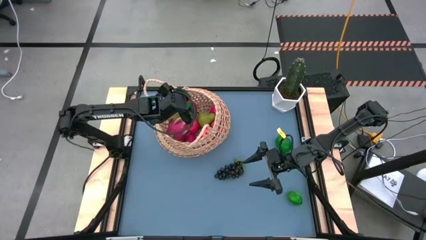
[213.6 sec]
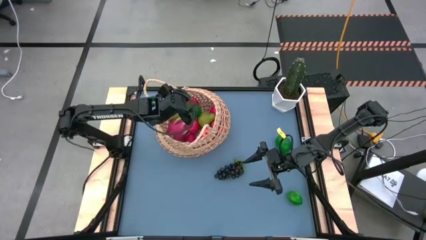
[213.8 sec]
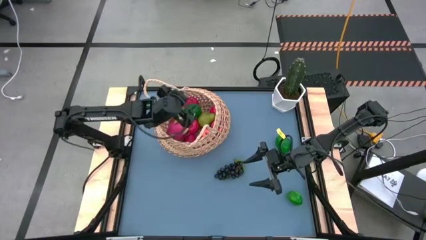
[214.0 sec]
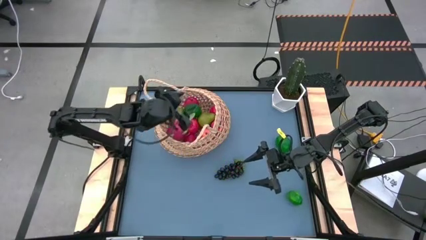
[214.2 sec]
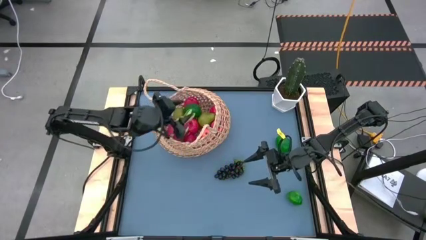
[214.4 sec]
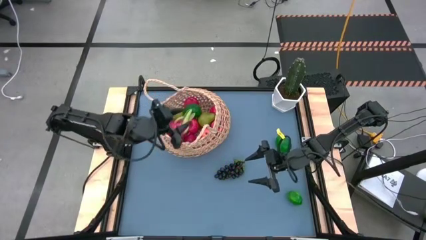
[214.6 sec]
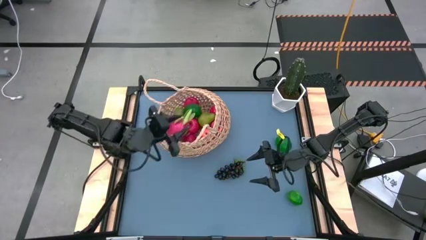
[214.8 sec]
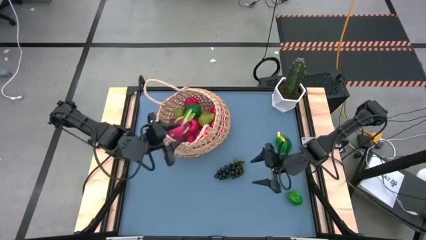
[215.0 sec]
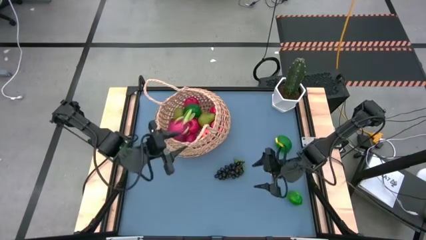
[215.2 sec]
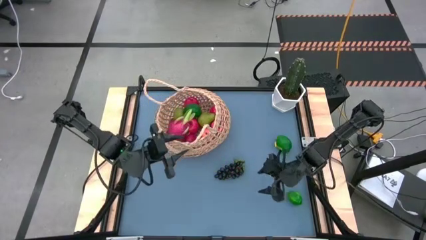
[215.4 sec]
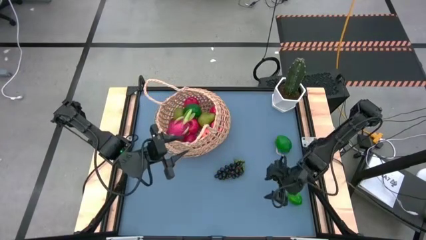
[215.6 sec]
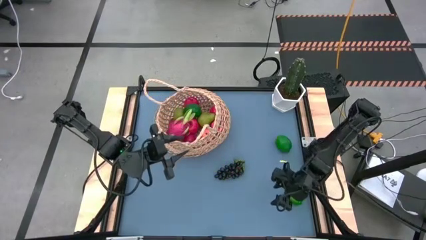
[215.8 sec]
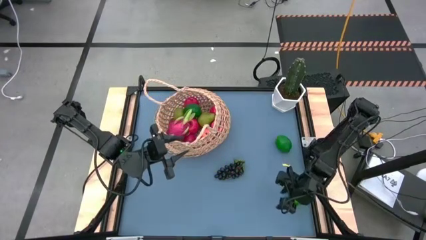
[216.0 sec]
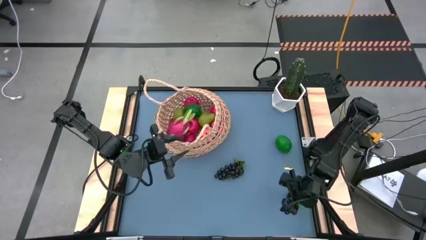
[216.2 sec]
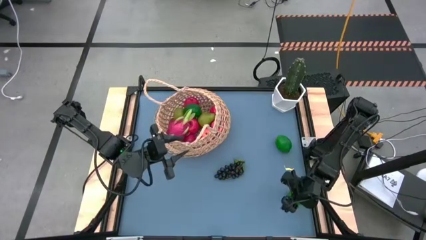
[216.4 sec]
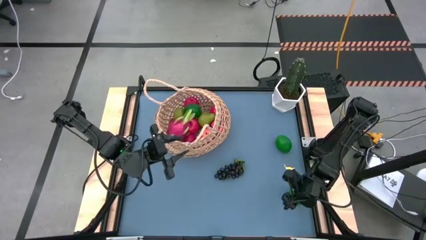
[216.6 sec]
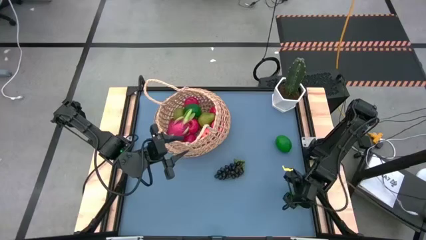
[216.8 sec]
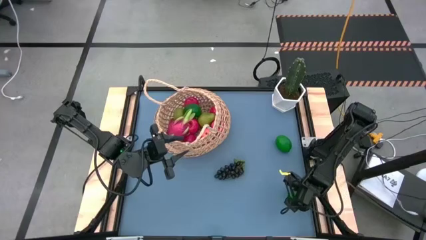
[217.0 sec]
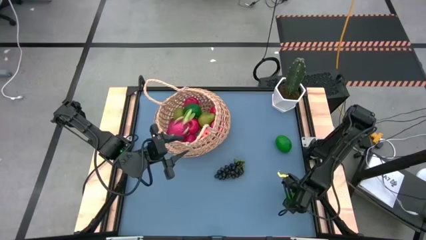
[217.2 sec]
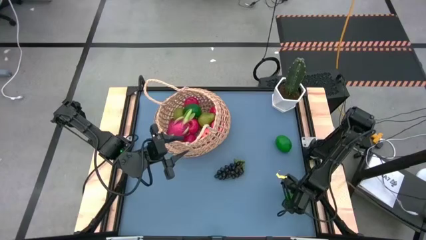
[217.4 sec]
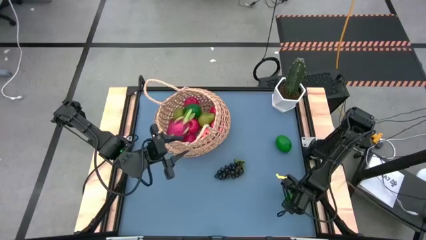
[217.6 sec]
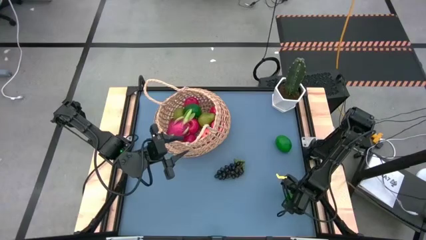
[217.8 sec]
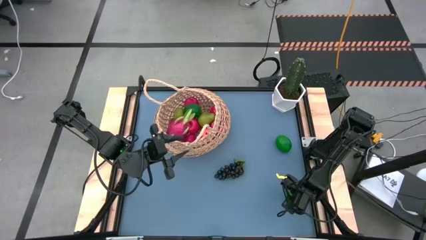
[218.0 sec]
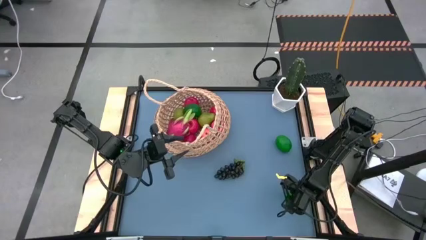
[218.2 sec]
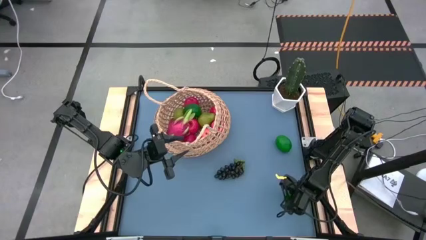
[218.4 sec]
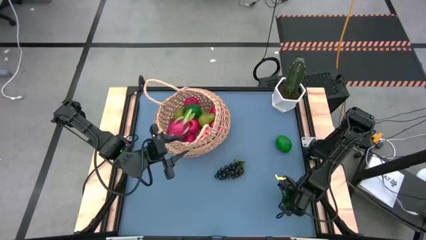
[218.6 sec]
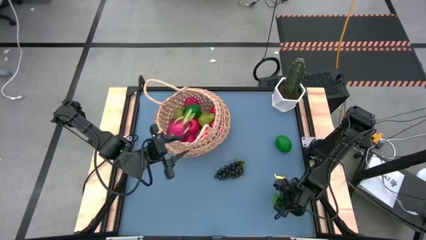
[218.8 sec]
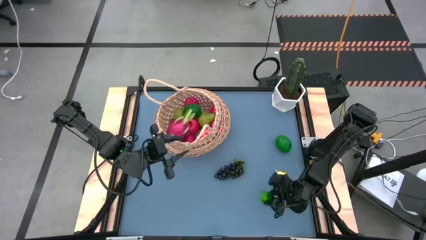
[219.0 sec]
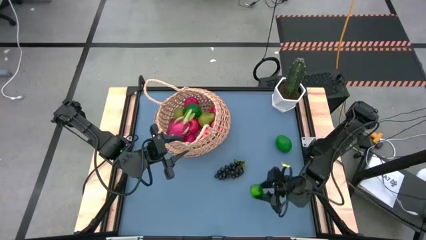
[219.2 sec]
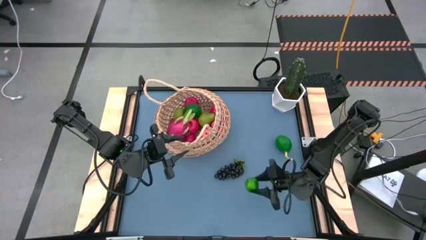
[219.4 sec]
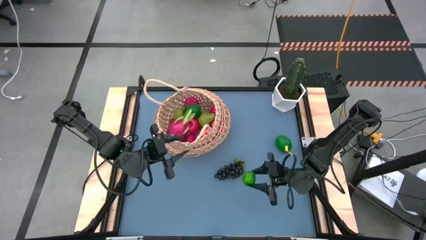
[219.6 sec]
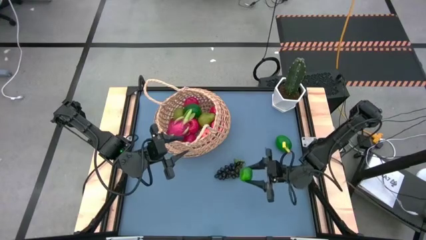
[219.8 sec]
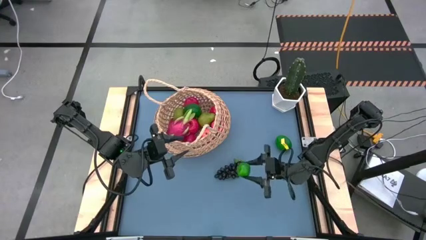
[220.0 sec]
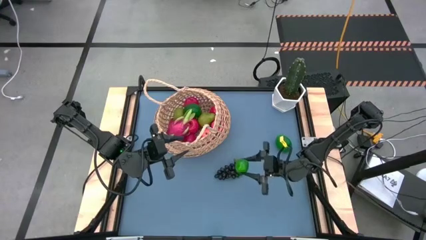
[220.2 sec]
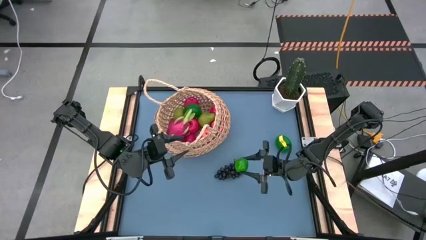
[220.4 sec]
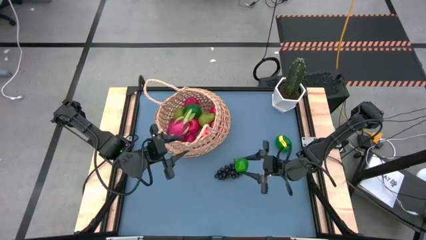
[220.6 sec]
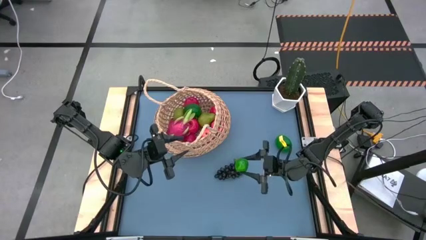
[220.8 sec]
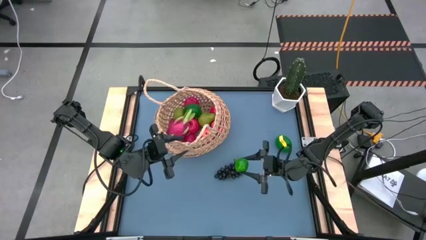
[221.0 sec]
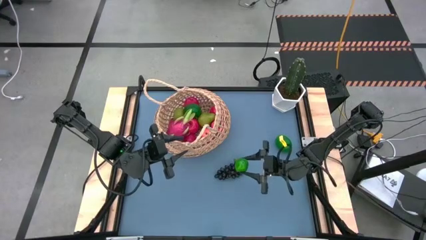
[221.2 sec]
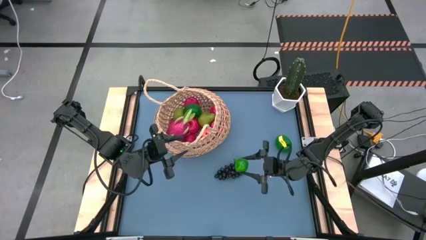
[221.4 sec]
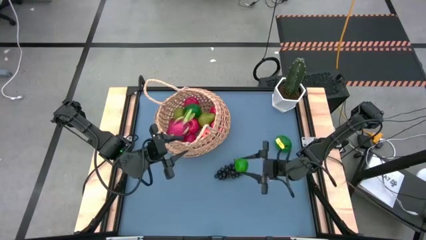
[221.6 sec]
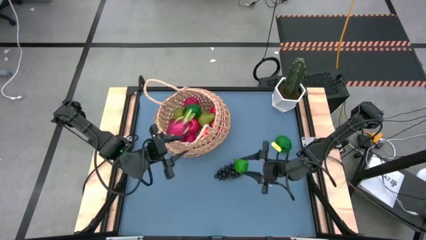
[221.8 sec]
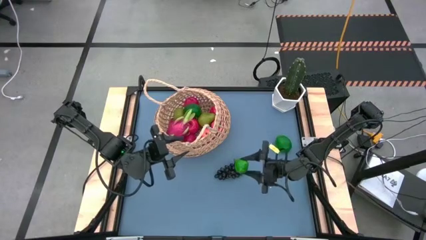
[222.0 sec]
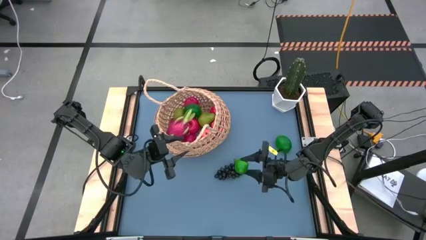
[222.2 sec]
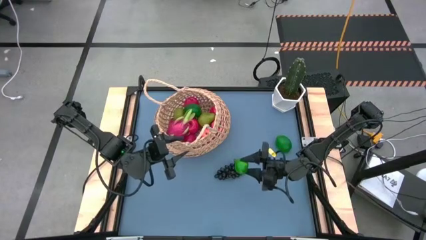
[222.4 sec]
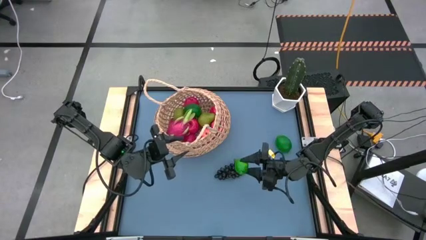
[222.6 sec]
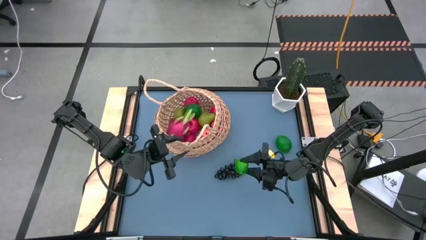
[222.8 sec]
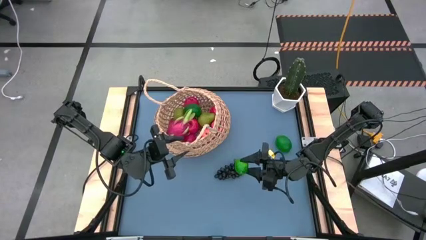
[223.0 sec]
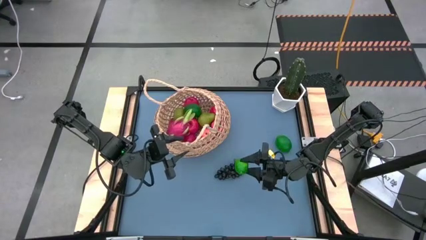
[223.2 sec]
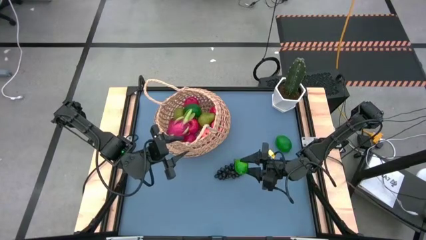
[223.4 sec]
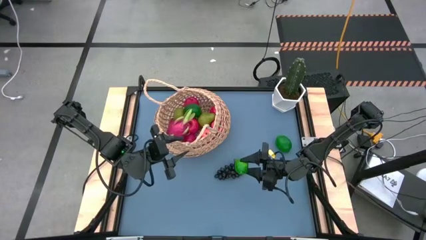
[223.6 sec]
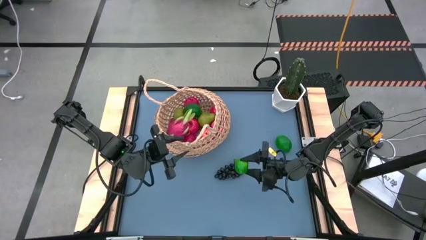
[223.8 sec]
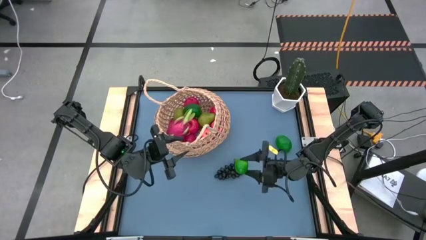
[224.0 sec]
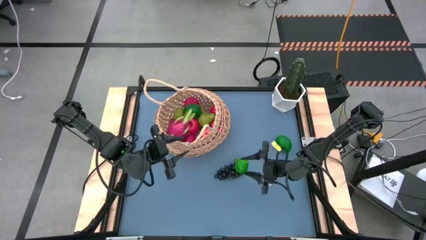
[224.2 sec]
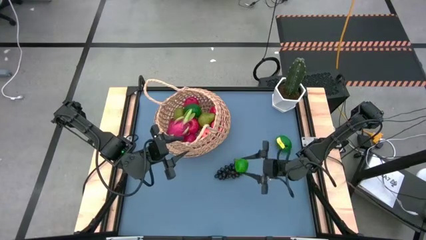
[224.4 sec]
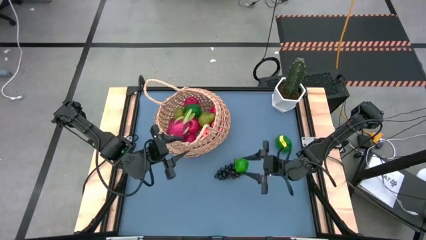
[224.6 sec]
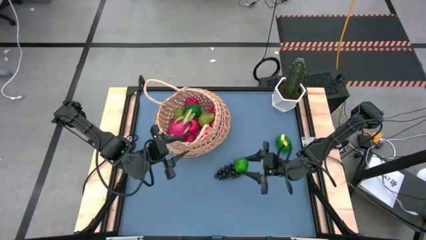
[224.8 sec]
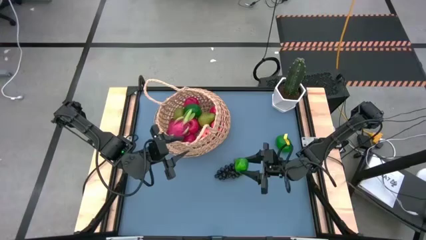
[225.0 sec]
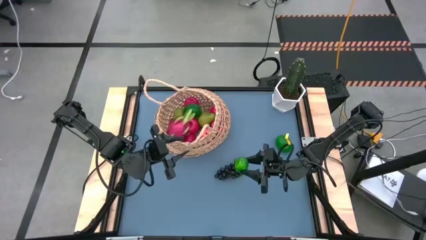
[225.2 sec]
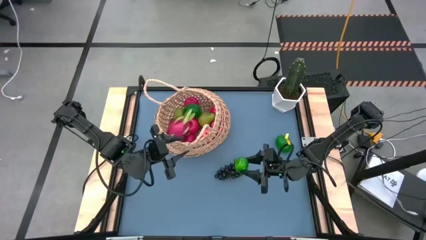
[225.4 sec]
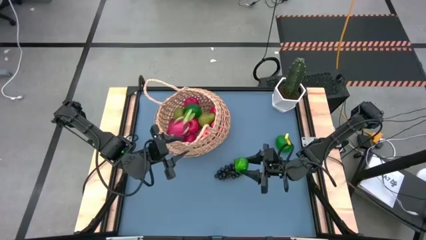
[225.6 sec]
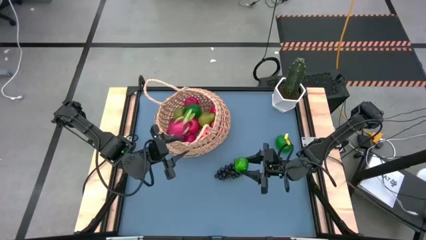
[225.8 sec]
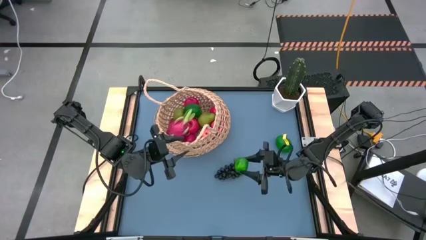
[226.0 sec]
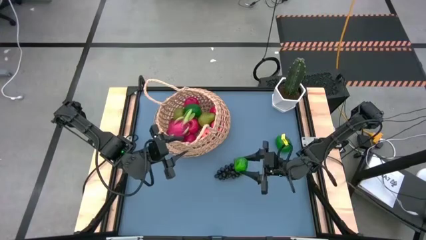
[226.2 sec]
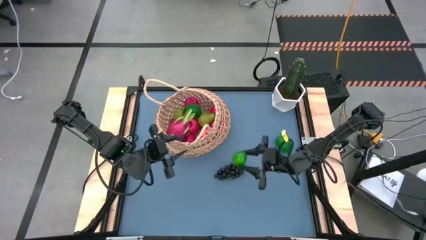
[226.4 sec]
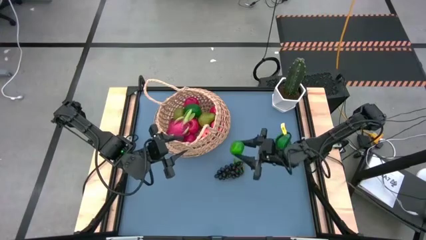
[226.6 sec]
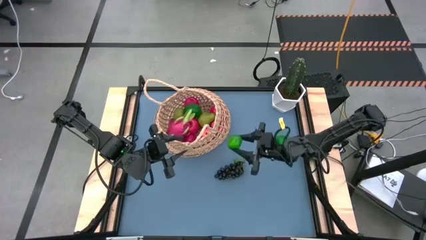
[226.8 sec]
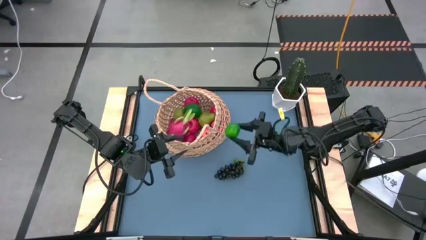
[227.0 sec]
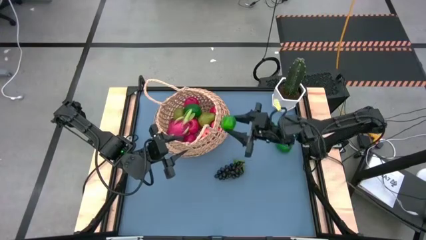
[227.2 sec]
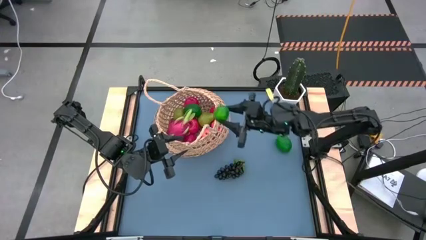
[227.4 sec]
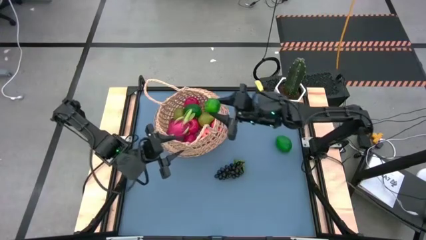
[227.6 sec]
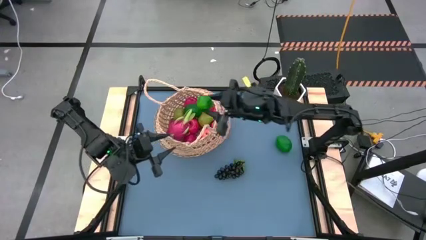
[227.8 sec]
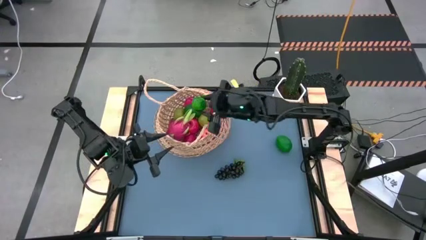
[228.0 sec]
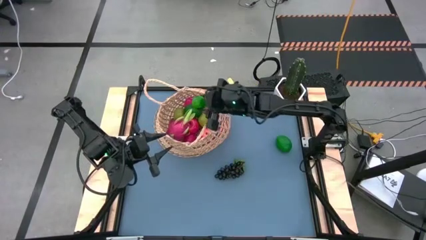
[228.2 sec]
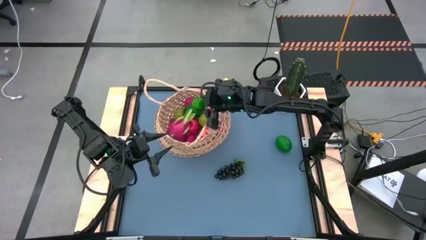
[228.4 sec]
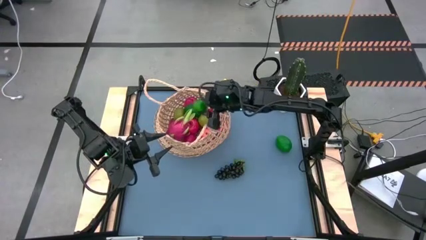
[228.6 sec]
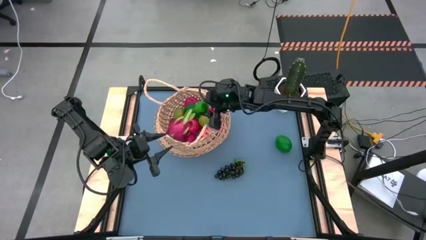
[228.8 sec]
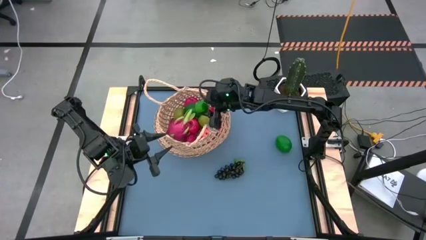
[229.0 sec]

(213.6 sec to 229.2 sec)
Task: Build produce basket
Put the green lime into the basket
